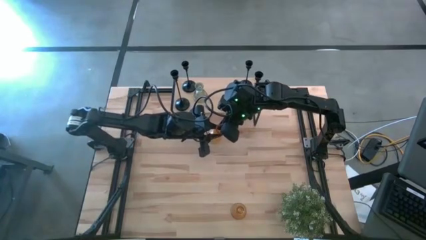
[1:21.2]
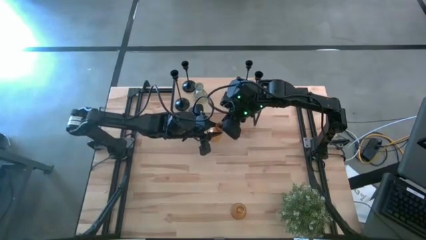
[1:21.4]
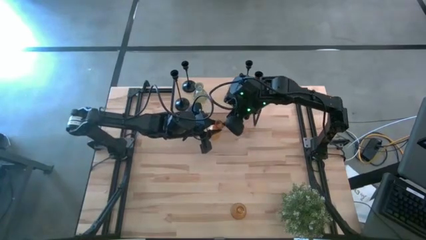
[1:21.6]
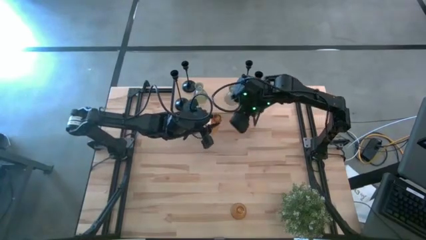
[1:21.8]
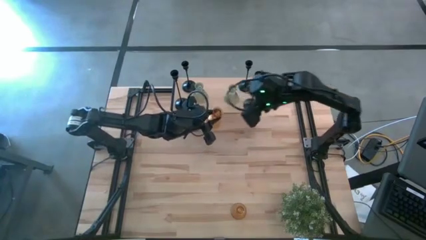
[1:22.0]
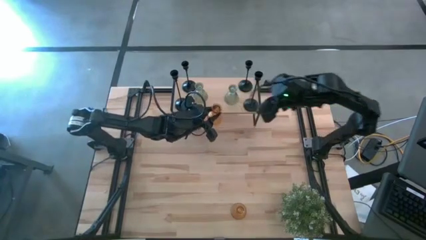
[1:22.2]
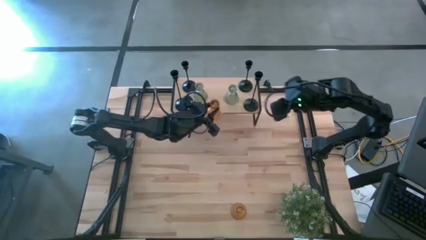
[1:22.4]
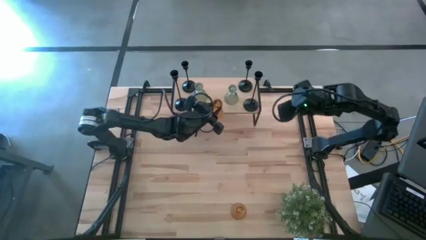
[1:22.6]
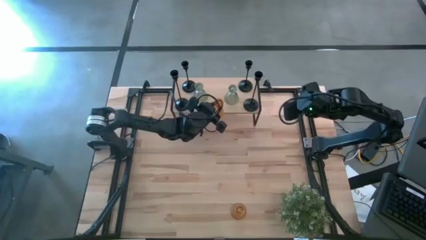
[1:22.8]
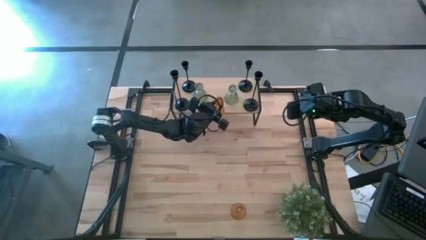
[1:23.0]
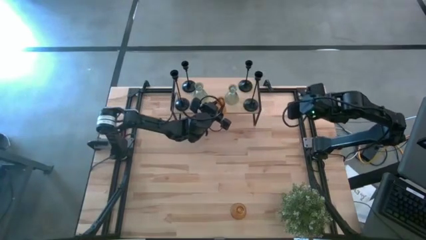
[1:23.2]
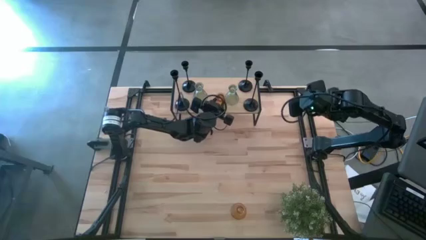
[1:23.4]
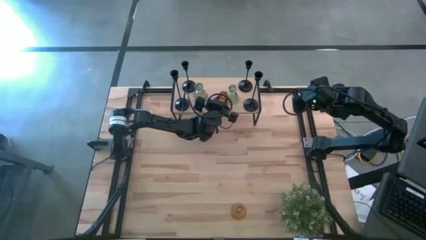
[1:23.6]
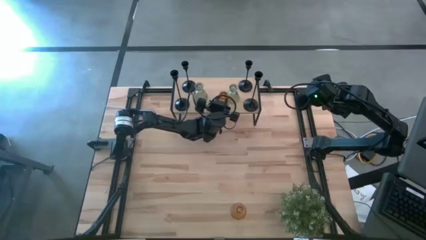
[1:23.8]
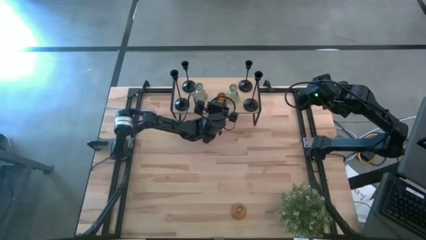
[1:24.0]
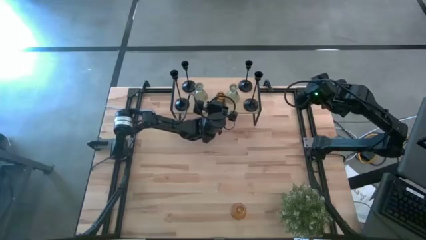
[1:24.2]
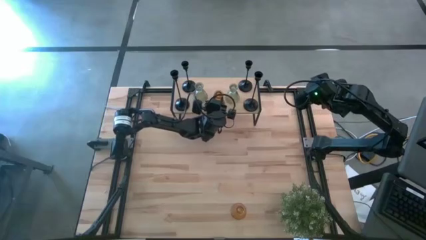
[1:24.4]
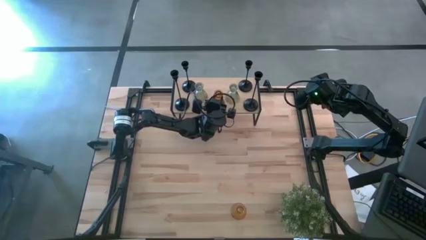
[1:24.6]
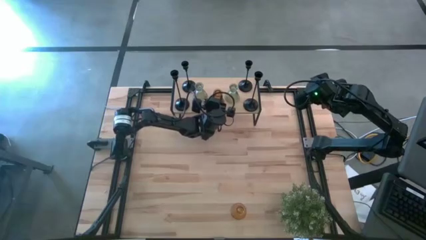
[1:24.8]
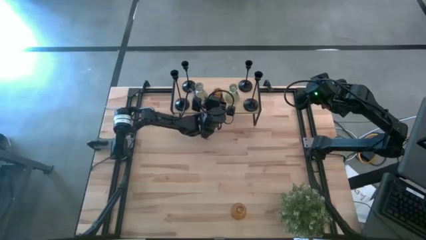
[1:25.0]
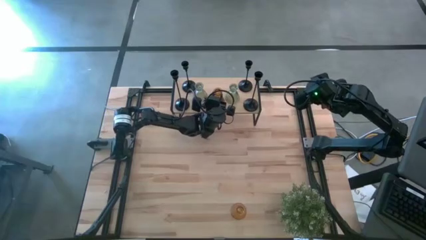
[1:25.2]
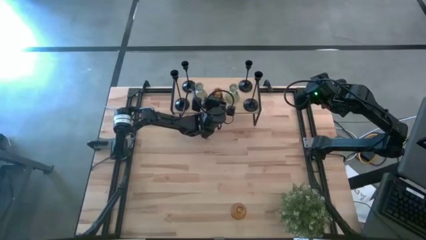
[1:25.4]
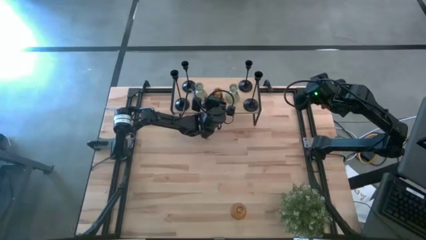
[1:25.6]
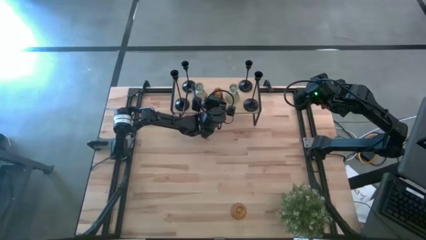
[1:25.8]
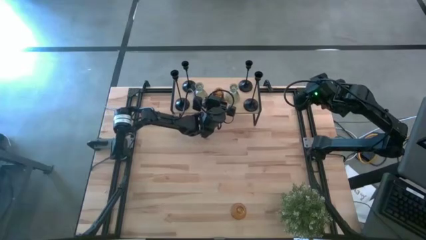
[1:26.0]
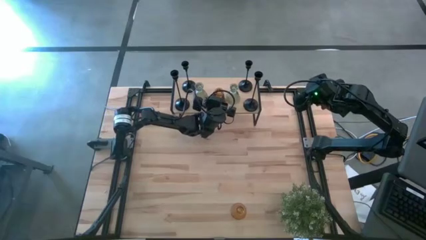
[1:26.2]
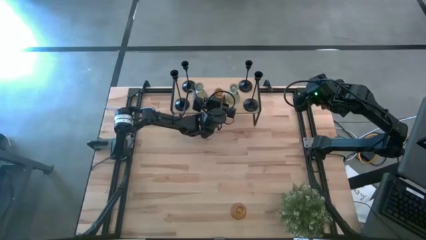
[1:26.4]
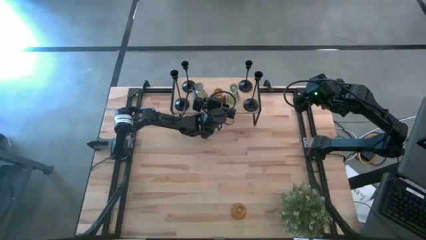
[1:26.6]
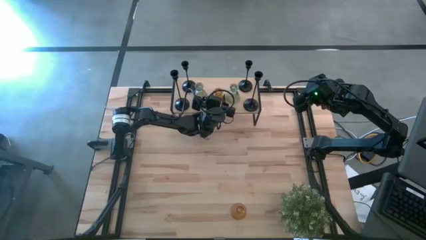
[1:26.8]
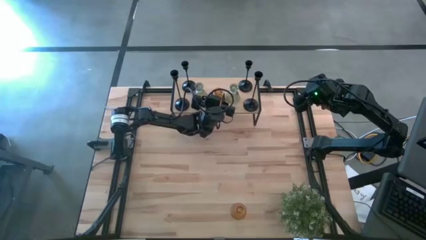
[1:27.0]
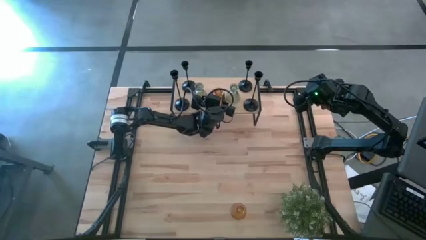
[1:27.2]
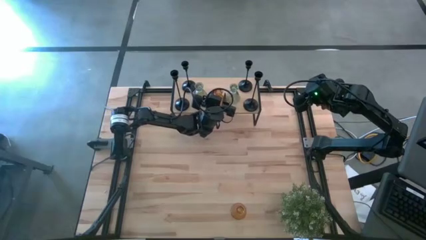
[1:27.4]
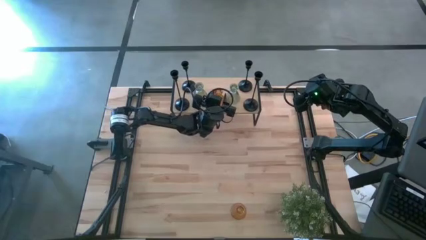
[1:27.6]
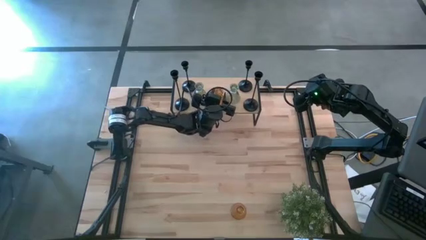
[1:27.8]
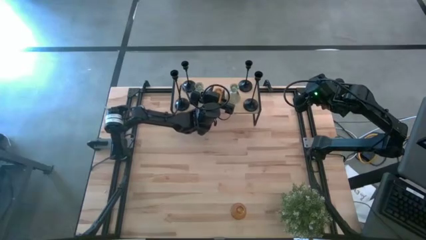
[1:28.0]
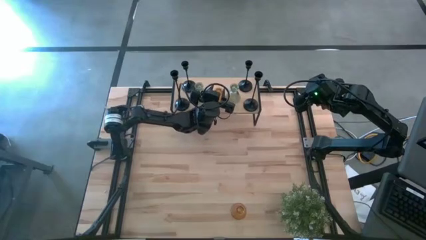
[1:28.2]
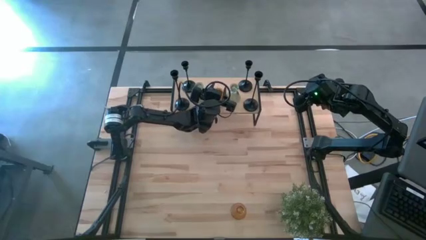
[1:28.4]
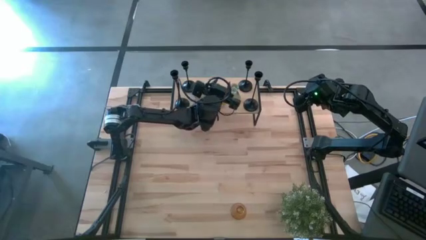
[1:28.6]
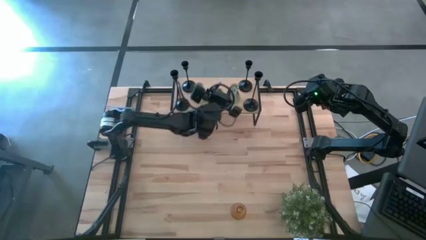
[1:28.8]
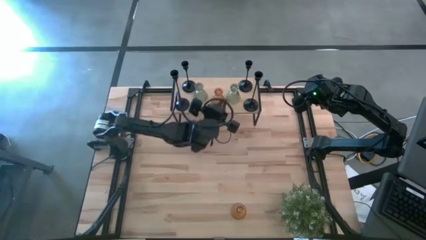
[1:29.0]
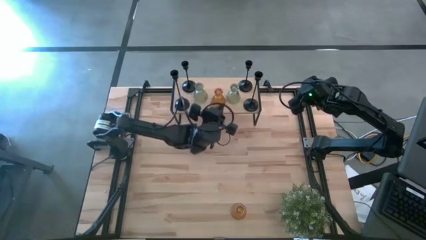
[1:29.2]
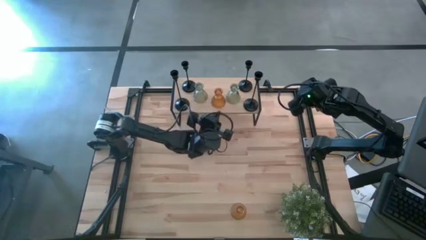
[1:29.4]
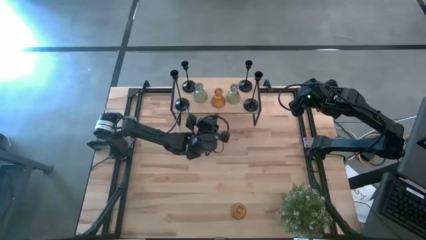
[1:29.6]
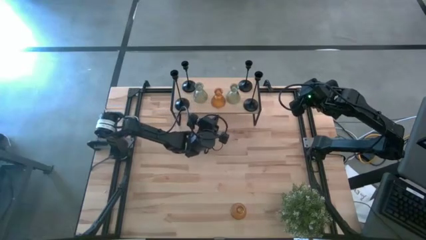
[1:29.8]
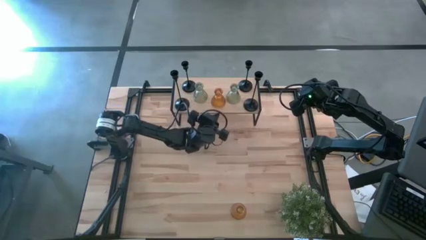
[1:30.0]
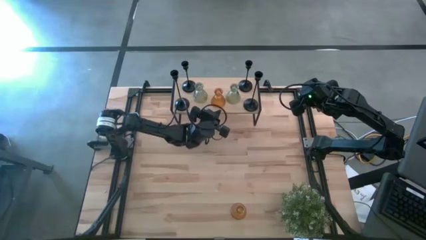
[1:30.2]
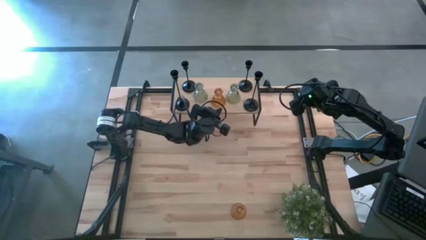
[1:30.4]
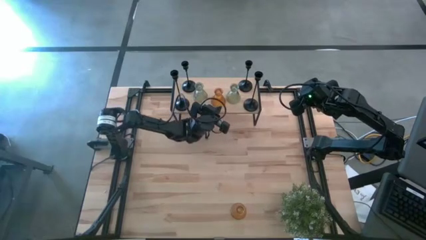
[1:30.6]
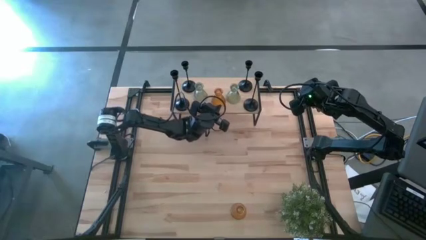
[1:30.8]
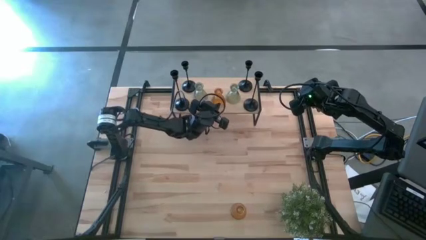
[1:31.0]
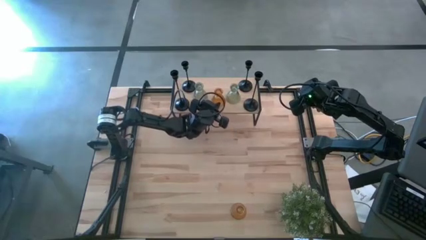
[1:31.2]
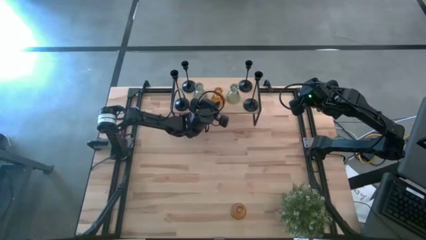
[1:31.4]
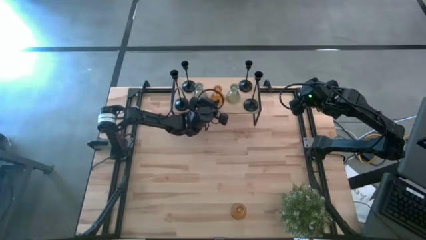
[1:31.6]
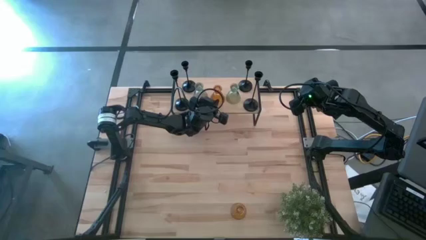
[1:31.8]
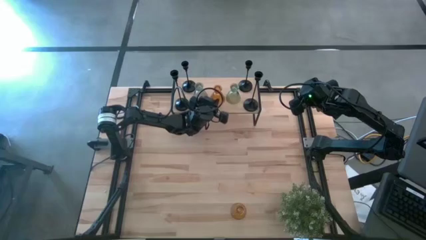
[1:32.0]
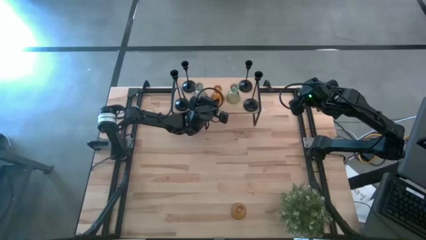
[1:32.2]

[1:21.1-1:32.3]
Task: Pick & Place candle stick holders
Put the orange glass candle holder on the shelf

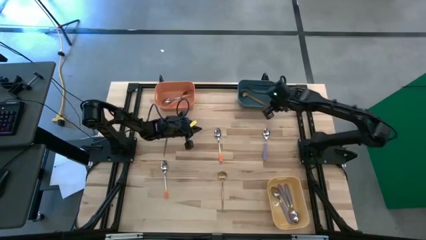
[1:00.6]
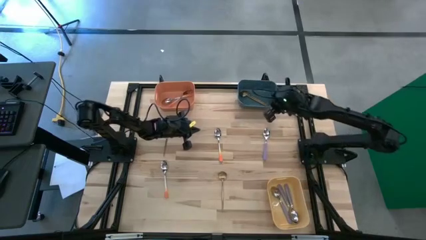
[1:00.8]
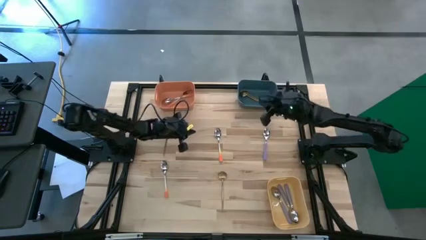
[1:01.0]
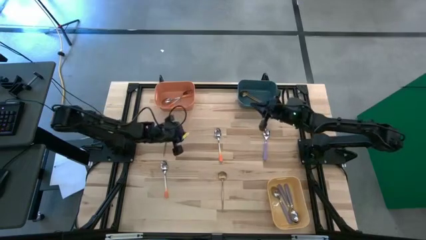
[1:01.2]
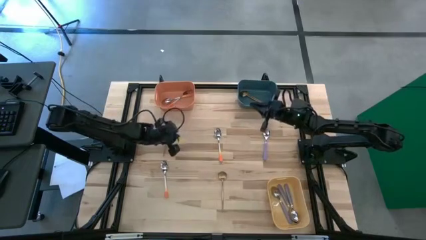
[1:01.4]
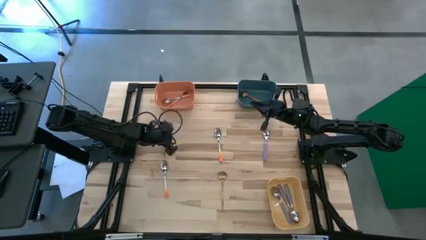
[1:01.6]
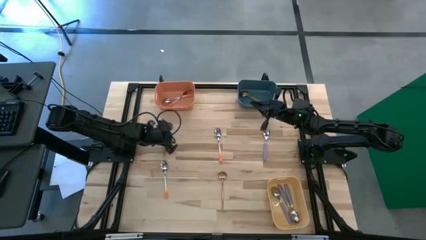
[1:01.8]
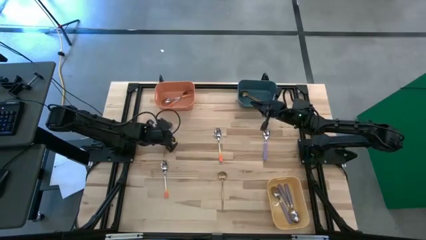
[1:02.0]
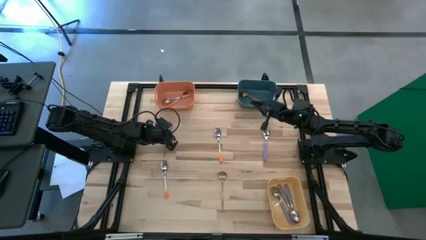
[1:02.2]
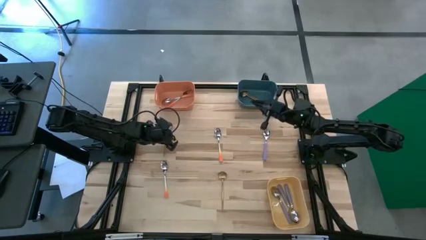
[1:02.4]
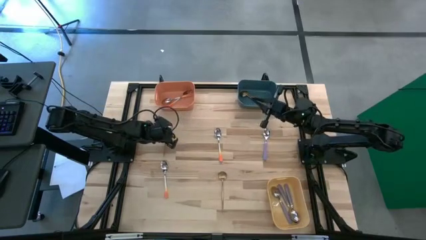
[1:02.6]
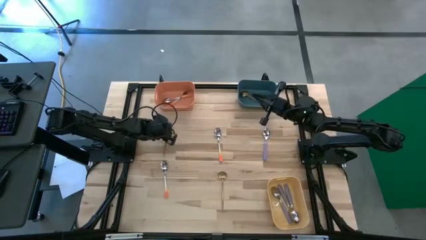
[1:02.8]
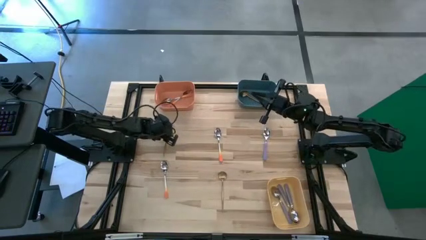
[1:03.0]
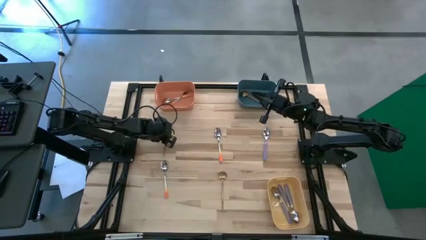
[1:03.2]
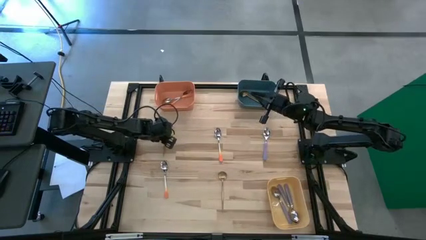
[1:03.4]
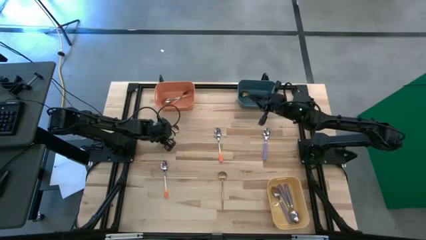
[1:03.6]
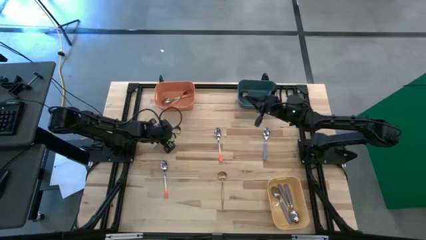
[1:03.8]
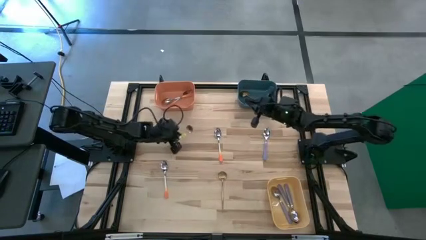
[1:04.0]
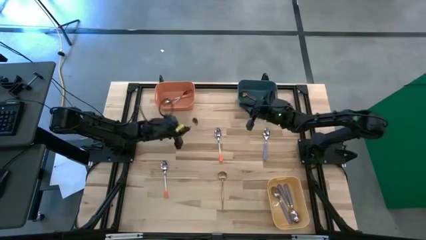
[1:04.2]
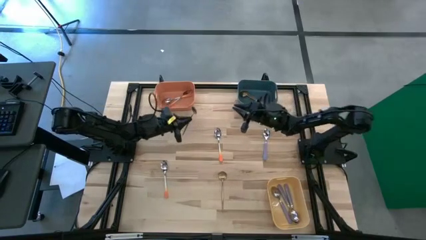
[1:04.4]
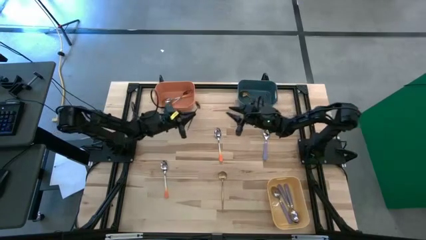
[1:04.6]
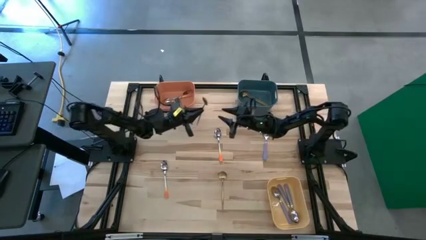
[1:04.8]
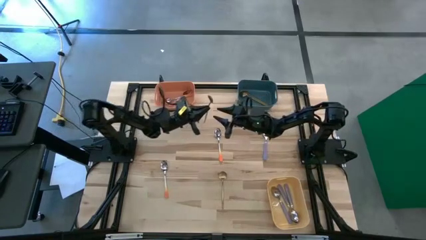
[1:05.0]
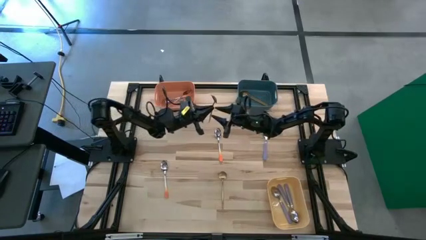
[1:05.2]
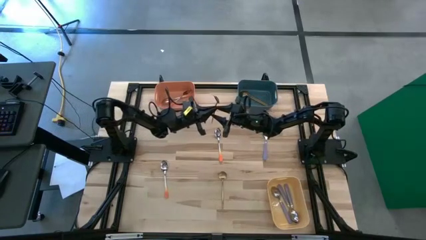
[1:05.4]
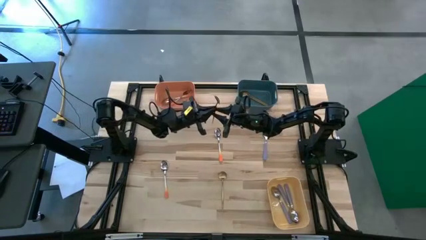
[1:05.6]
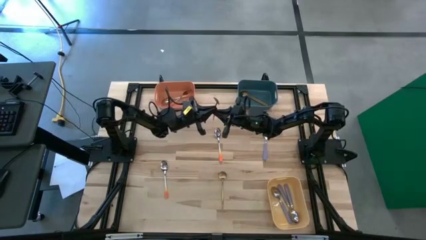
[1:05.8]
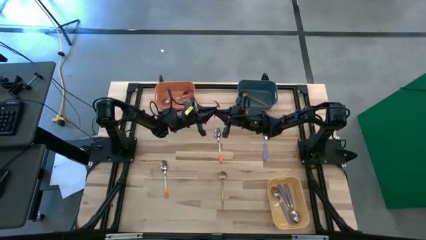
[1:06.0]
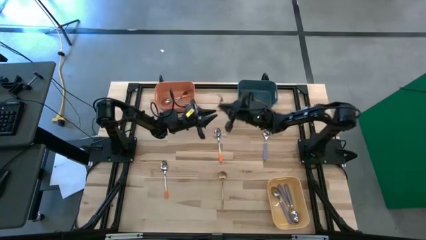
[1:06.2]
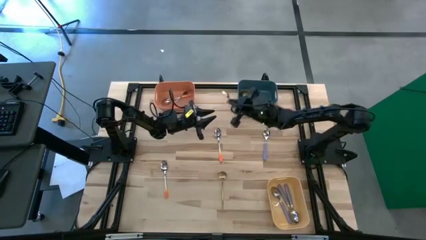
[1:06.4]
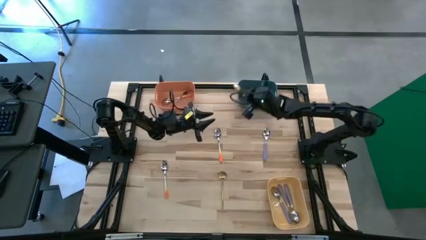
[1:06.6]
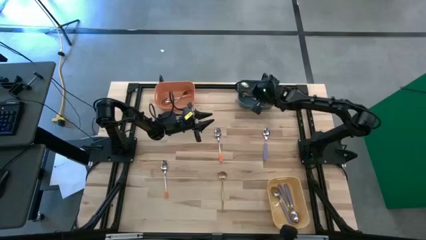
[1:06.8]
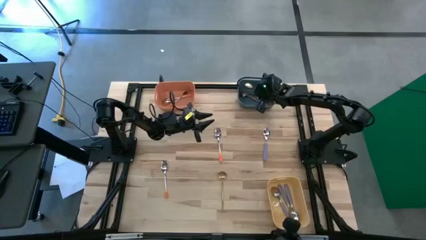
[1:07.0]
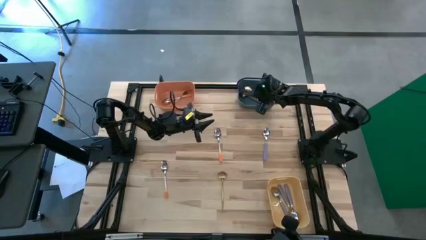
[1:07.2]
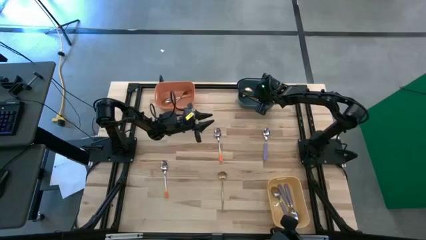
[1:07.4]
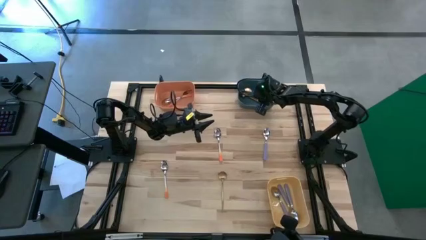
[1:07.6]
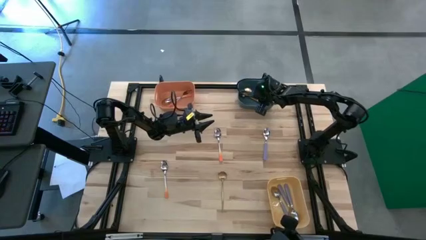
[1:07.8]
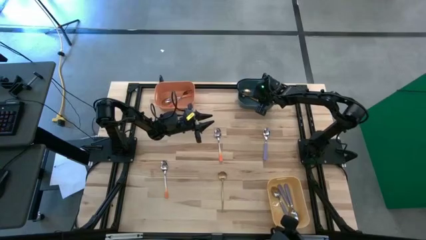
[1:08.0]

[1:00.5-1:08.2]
Task: Sort silverware by color (type)
Put the gold spoon into the blue bin
